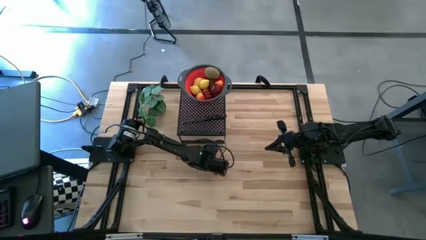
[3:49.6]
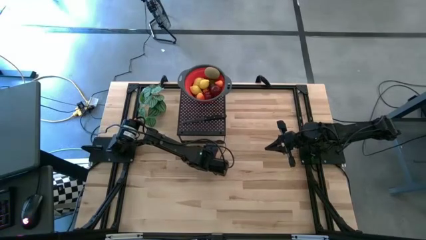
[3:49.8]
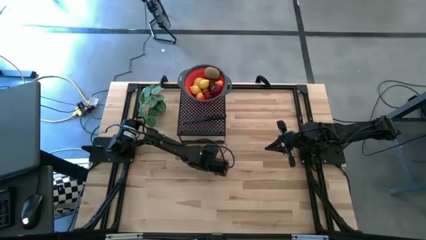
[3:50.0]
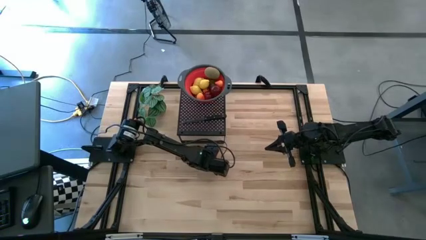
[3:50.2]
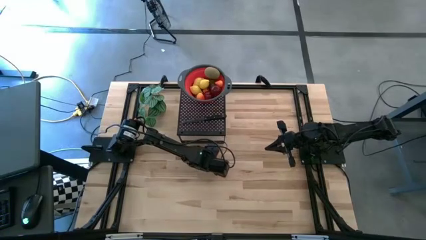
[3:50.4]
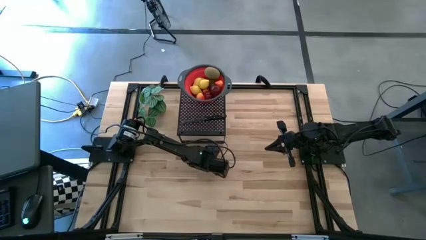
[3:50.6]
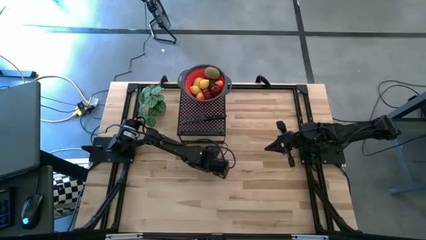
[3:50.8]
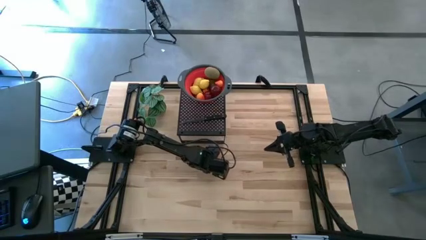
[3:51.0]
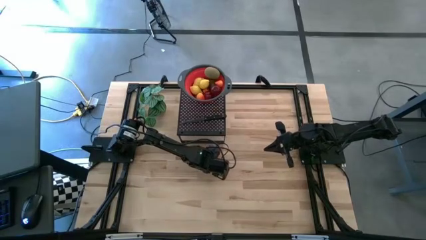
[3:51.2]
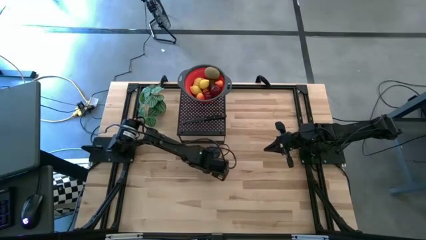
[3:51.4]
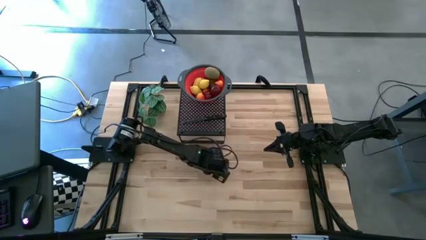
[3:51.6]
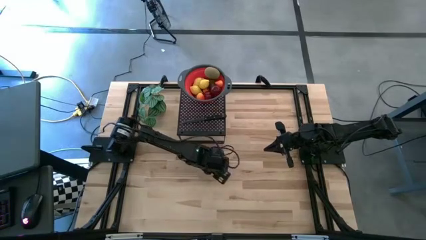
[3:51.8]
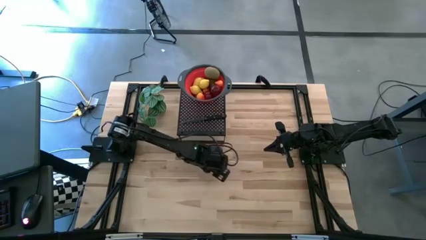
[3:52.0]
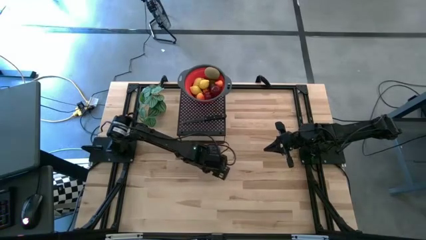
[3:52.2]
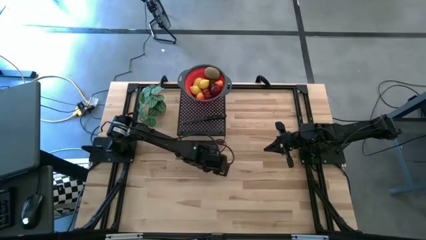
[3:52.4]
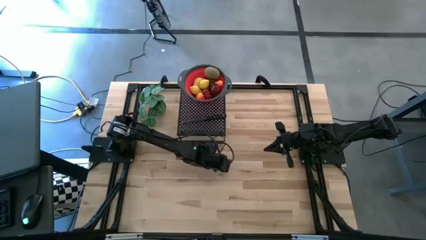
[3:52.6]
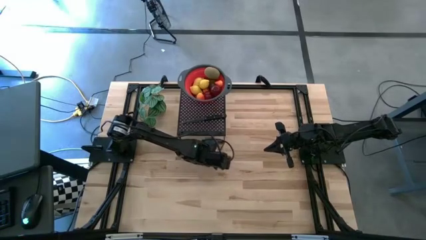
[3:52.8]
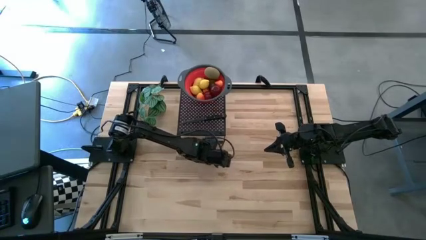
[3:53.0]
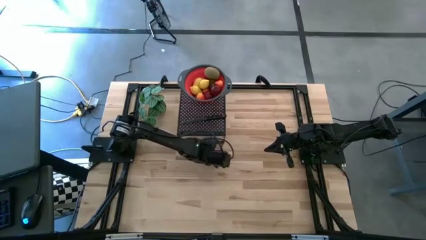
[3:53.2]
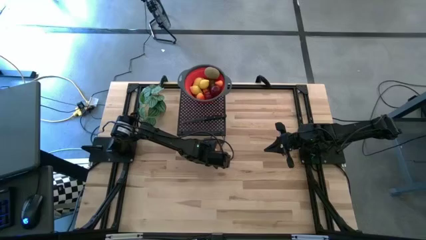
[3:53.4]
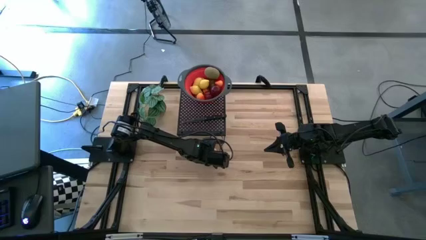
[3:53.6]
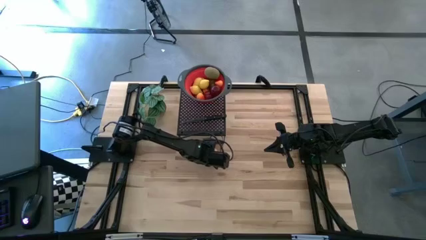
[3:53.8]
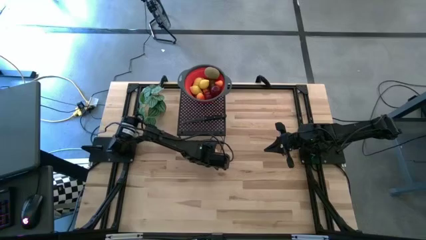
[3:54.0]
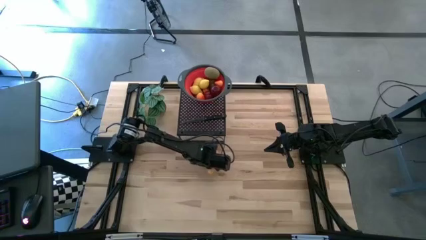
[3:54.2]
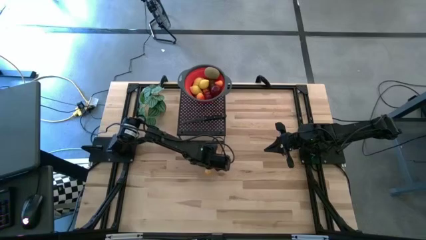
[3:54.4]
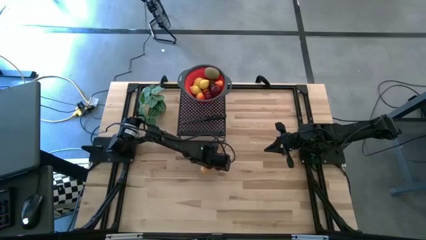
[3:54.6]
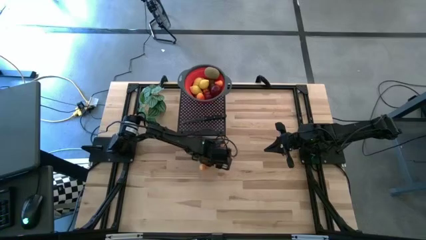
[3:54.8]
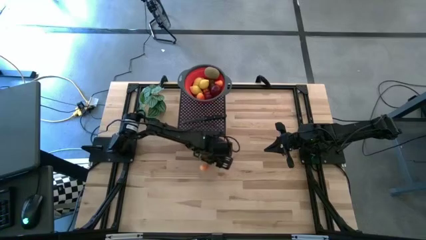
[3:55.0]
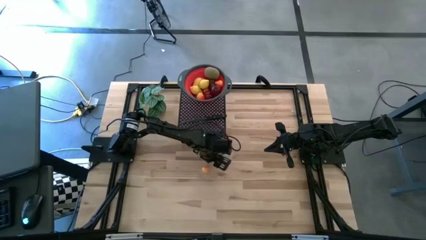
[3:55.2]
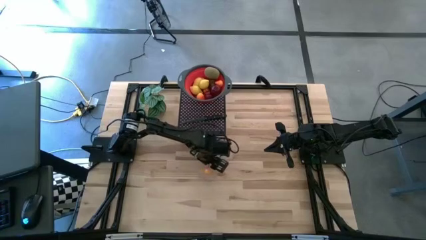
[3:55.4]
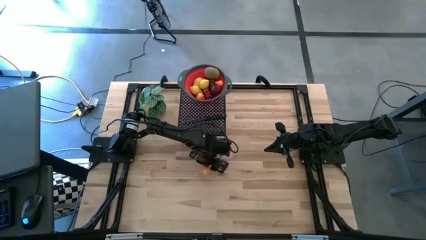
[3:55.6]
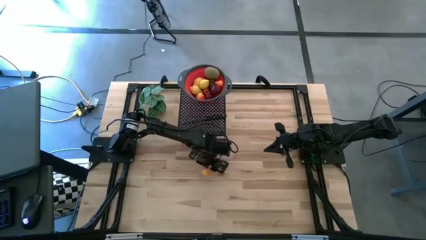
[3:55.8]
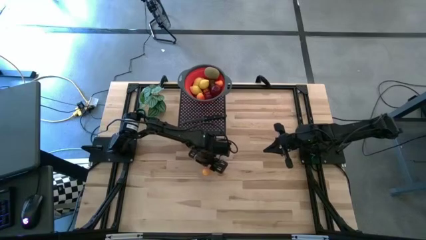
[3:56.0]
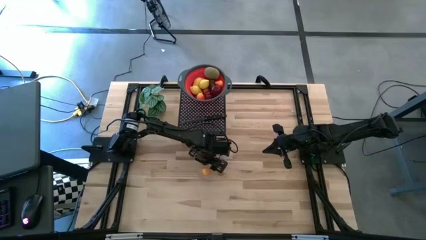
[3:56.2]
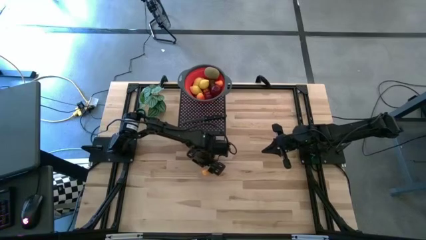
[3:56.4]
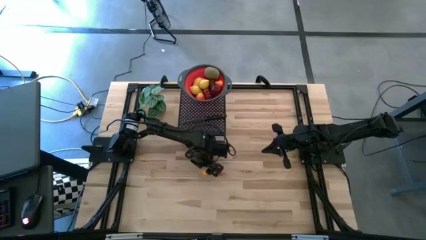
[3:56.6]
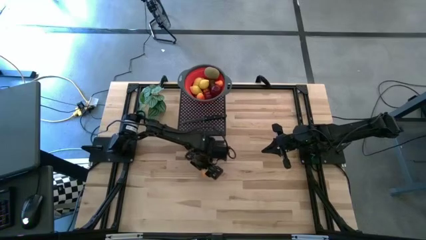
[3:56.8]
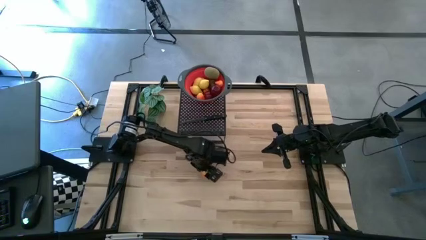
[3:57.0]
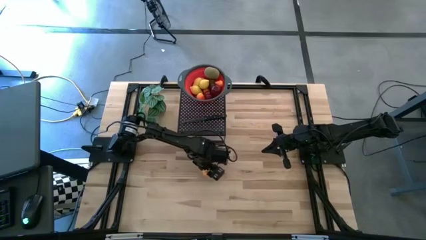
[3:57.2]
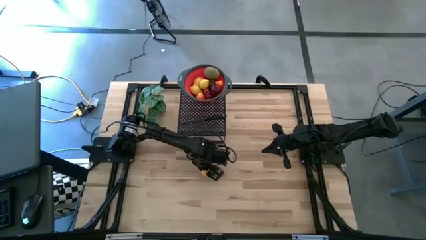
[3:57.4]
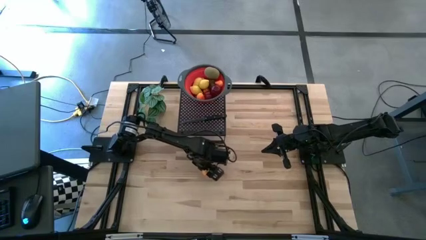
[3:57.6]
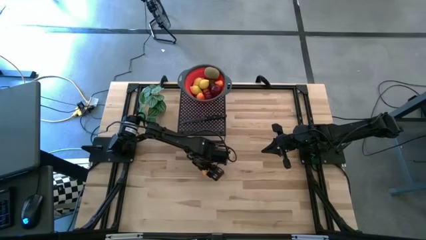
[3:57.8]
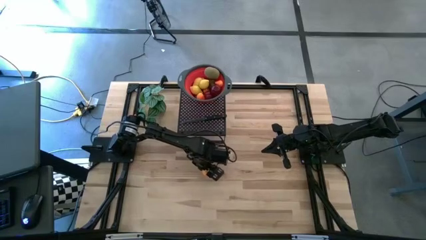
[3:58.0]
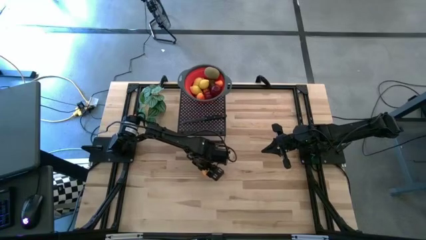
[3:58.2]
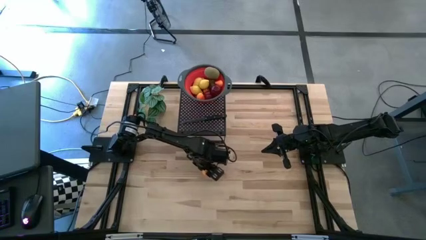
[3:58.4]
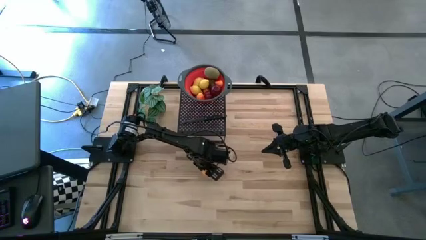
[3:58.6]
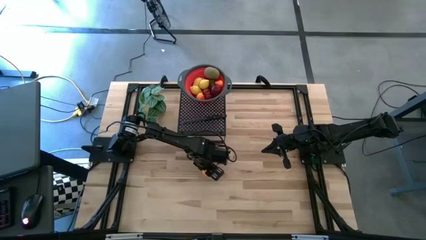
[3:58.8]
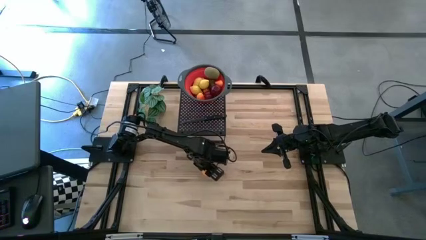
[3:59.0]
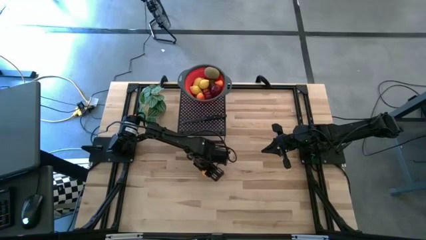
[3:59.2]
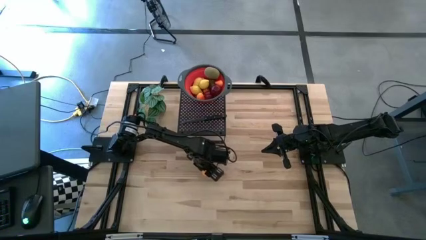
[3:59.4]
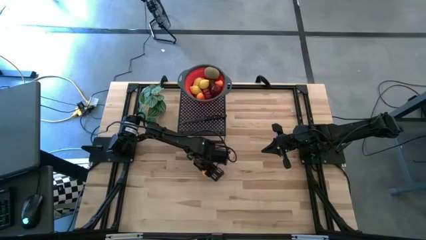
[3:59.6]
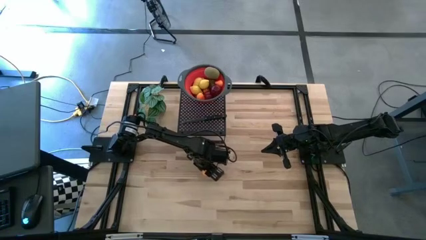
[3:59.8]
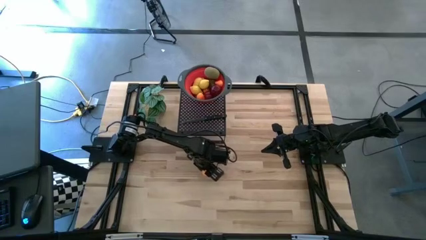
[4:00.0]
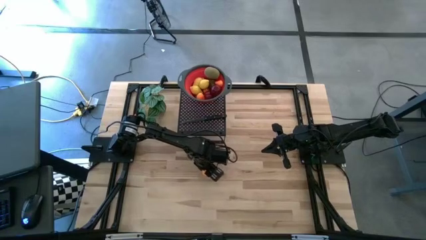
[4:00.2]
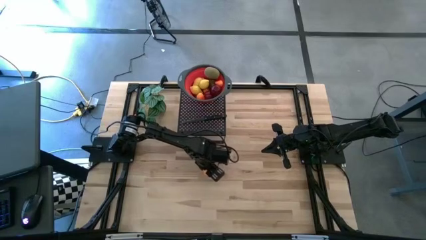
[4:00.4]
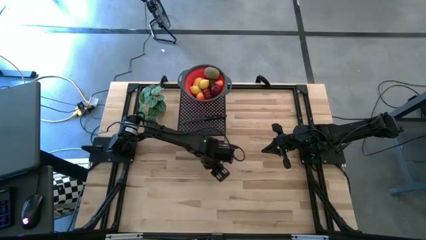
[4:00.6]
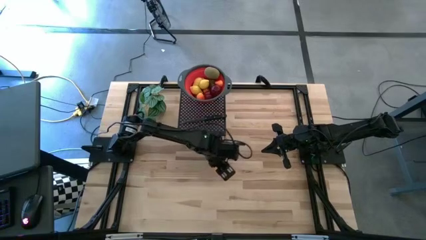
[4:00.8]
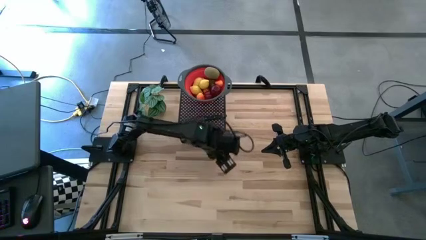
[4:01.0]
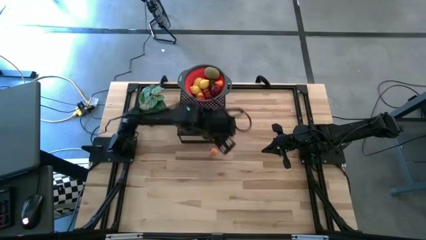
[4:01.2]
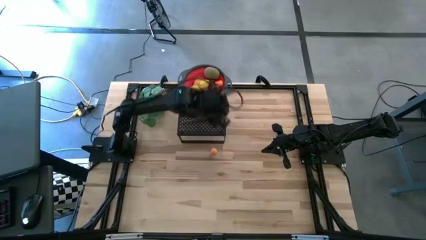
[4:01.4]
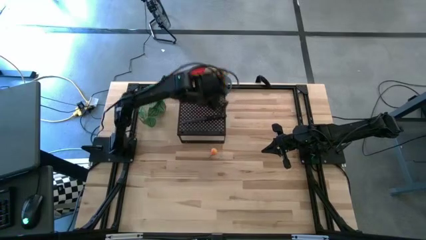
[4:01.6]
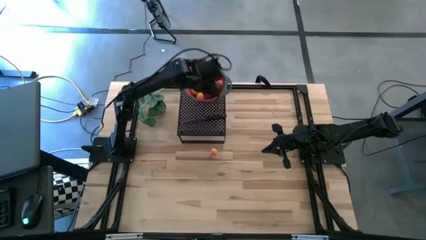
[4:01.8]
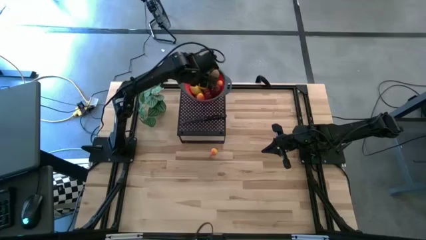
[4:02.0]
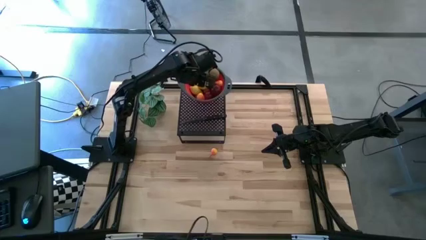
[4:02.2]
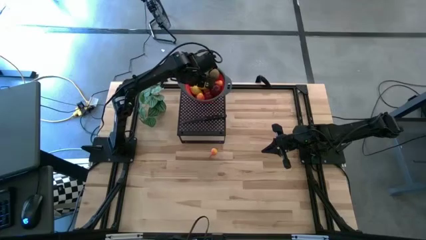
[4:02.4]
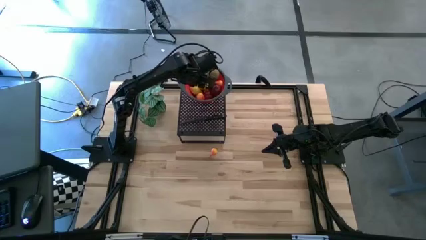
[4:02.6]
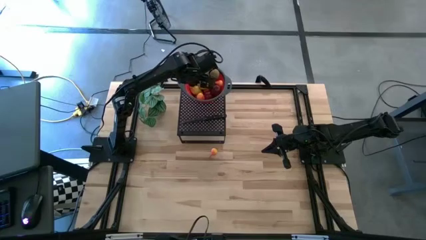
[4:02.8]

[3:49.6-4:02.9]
Task: Pick & Place Fruit
Put the pear into the red strainer bowl

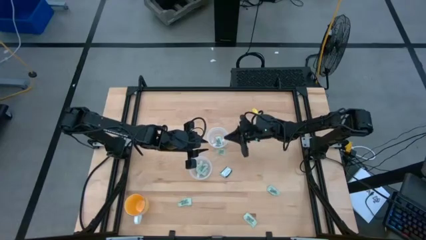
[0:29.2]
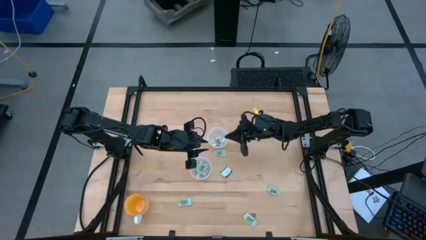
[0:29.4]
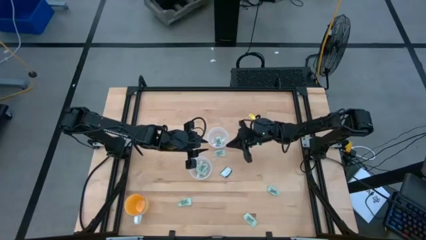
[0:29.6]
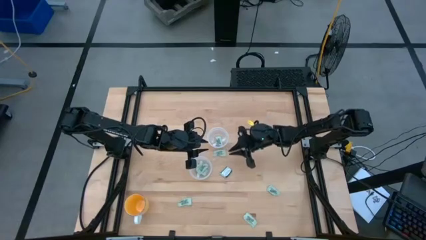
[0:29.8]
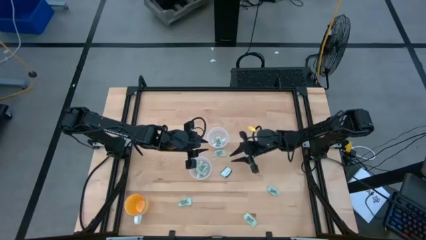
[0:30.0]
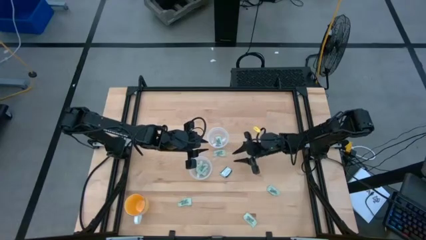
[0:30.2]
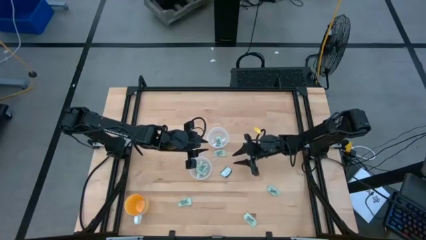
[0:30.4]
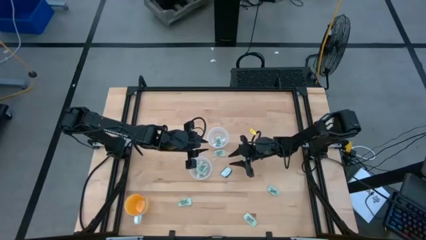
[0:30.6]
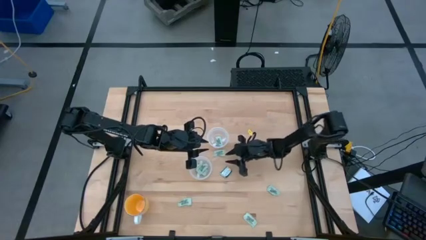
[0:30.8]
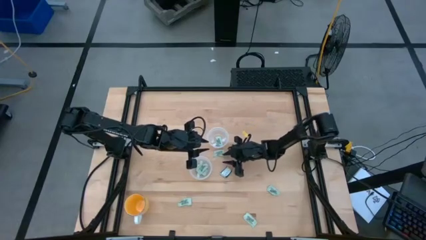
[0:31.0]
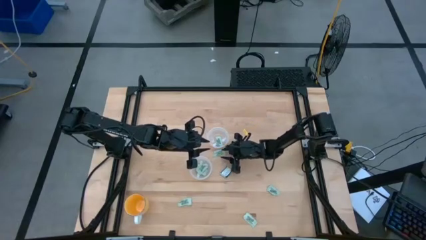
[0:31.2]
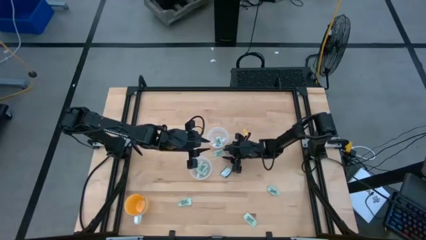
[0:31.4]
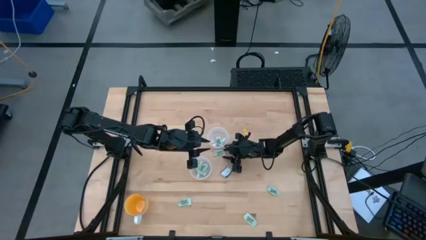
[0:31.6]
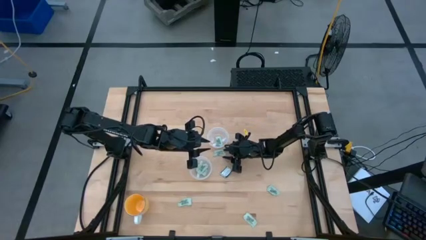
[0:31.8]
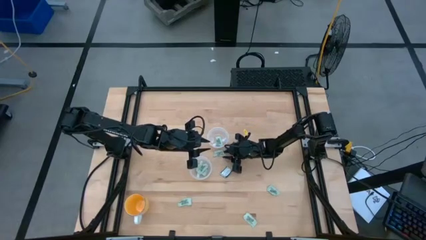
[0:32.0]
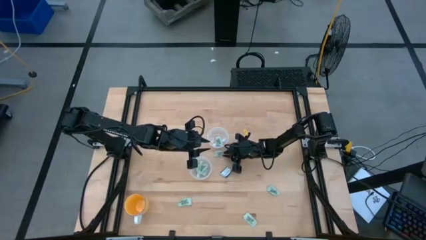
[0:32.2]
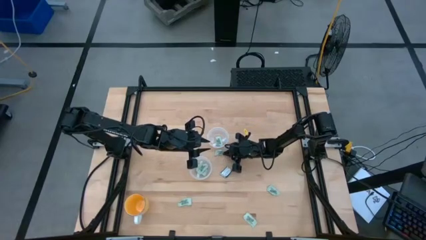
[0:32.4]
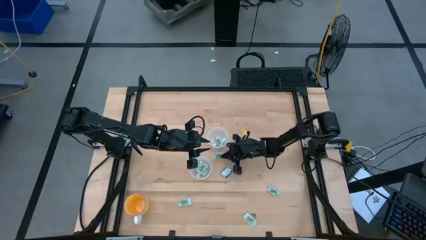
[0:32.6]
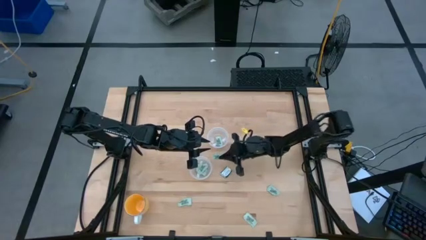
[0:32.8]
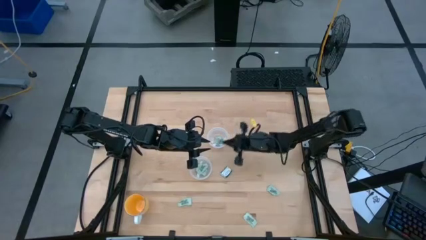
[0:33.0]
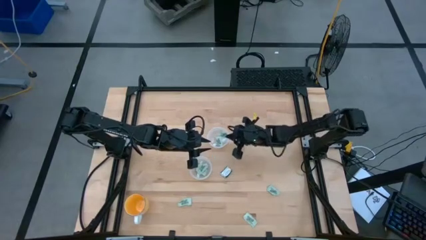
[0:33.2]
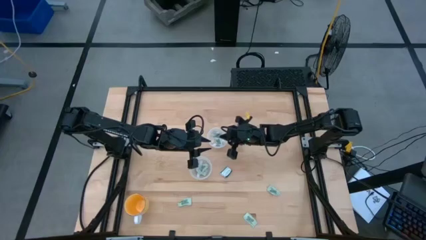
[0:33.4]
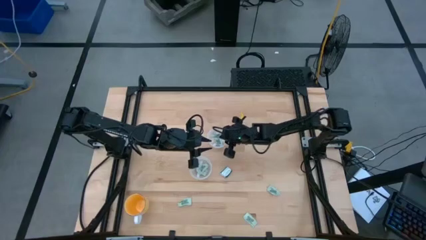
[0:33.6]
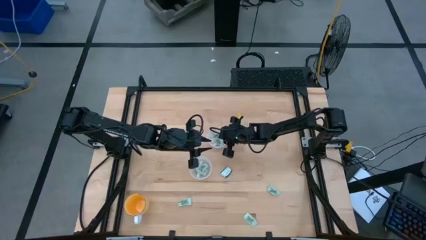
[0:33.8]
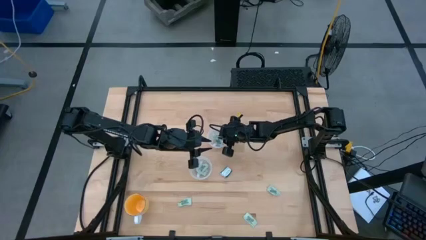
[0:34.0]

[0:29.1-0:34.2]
Task: Pick and place Stevia / Truvia into bins
Put the stevia packet into the top transparent container
